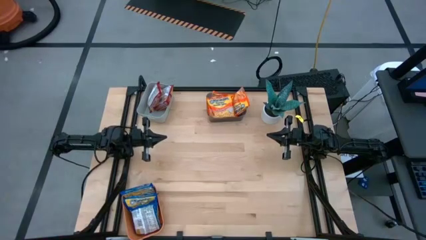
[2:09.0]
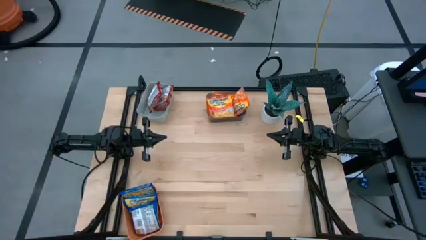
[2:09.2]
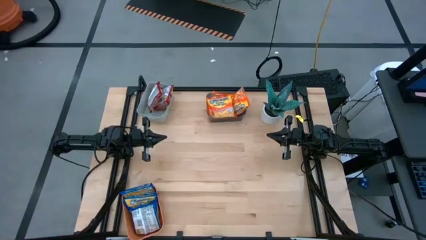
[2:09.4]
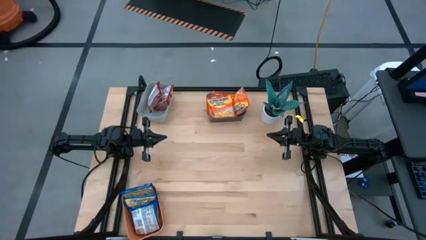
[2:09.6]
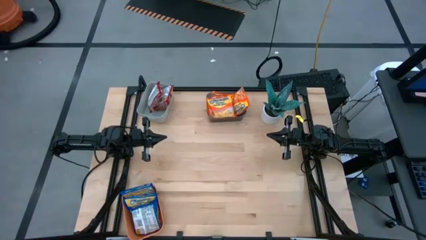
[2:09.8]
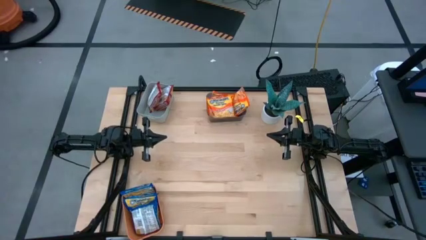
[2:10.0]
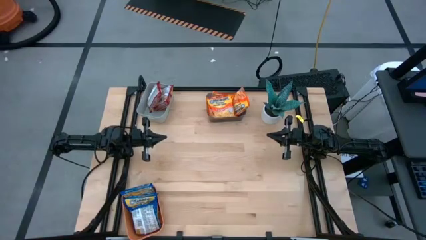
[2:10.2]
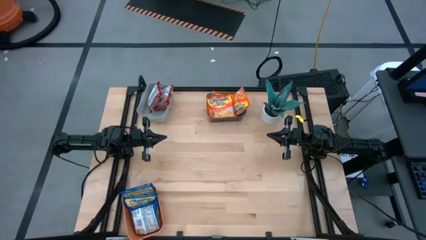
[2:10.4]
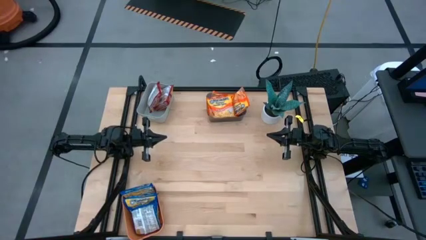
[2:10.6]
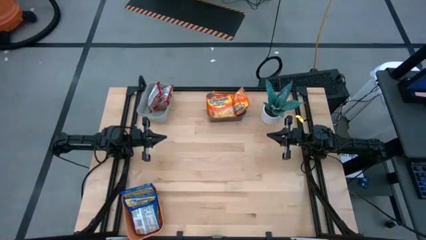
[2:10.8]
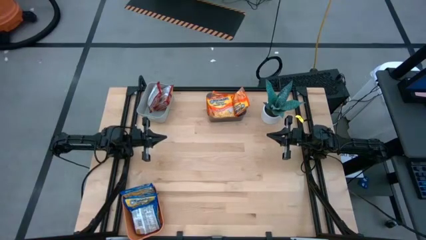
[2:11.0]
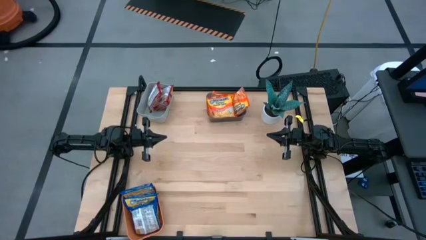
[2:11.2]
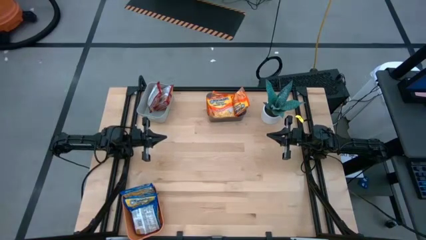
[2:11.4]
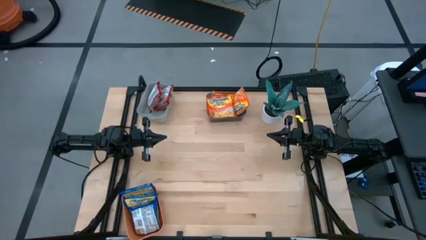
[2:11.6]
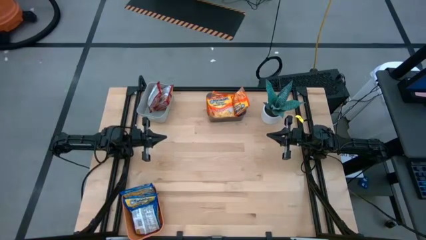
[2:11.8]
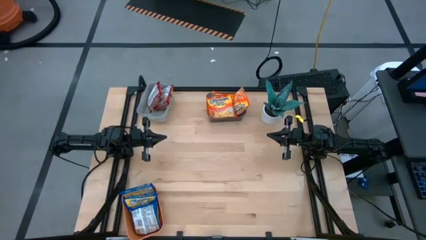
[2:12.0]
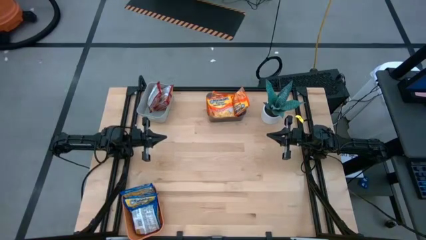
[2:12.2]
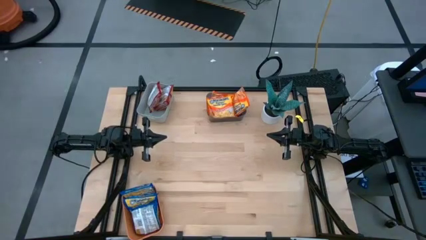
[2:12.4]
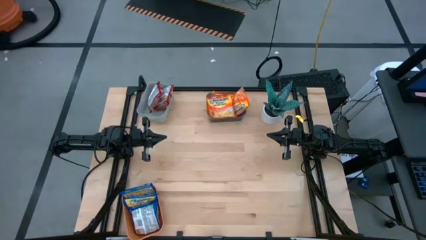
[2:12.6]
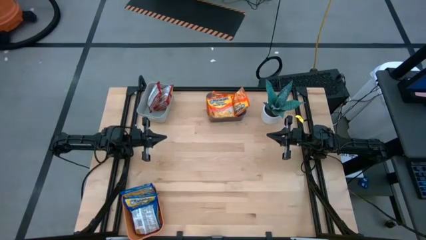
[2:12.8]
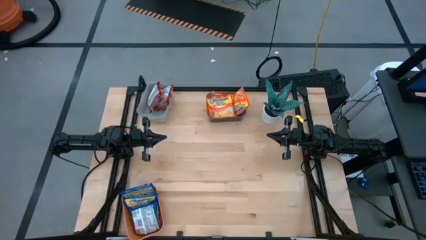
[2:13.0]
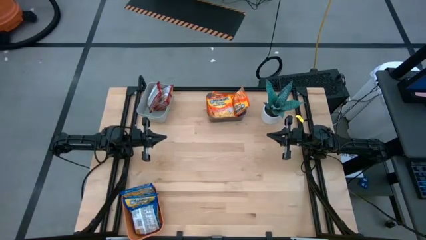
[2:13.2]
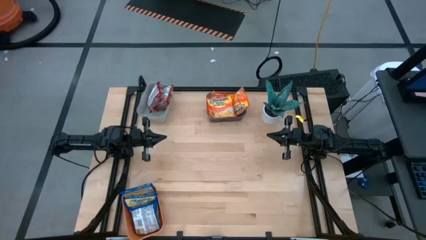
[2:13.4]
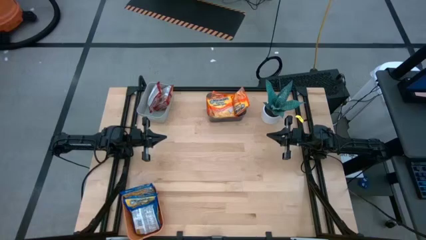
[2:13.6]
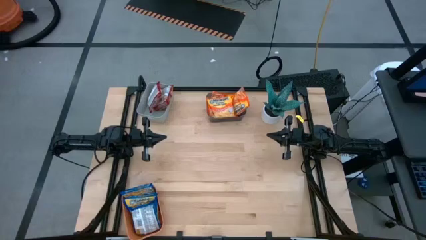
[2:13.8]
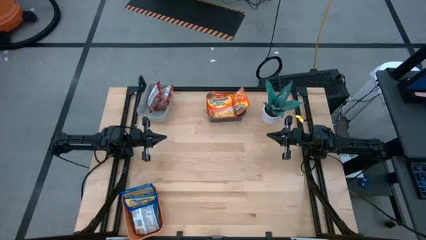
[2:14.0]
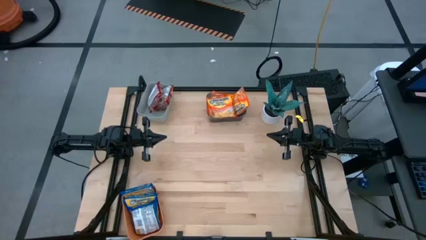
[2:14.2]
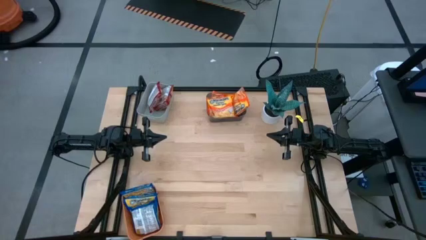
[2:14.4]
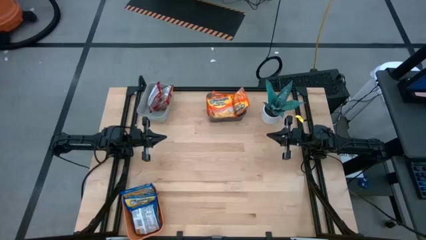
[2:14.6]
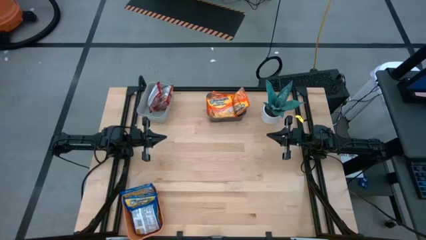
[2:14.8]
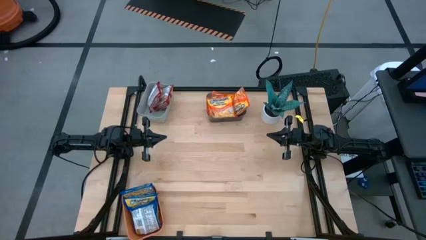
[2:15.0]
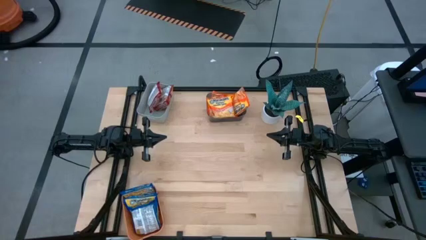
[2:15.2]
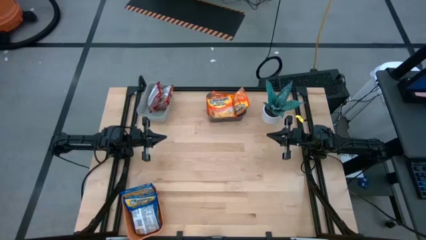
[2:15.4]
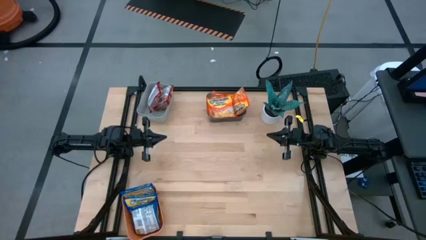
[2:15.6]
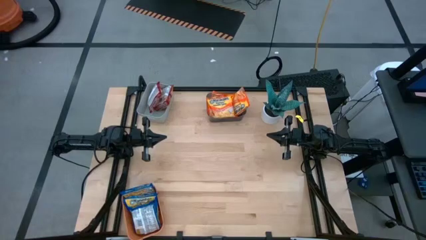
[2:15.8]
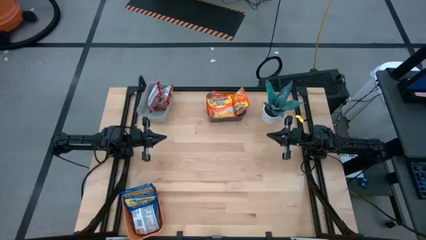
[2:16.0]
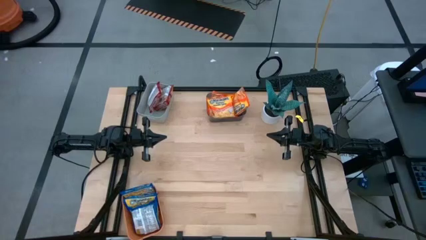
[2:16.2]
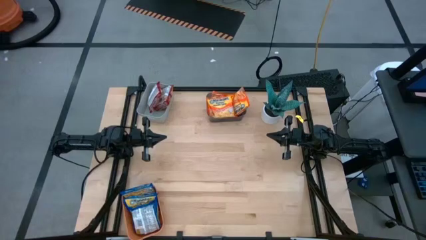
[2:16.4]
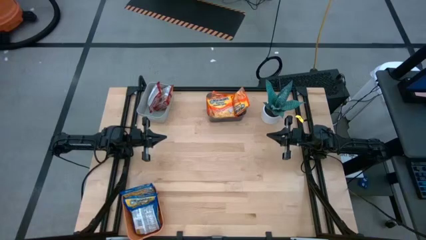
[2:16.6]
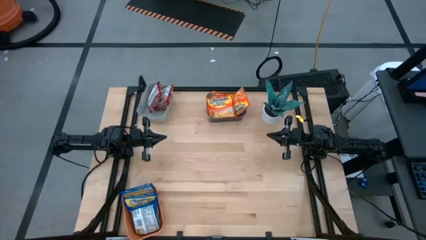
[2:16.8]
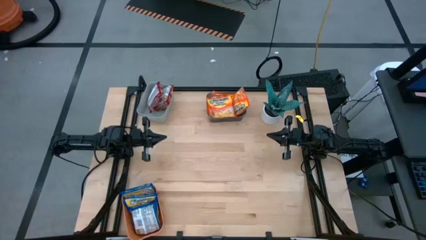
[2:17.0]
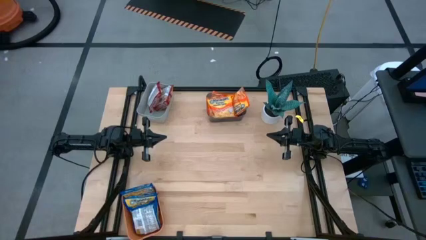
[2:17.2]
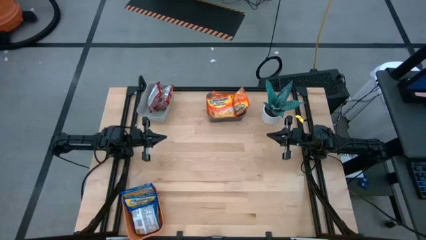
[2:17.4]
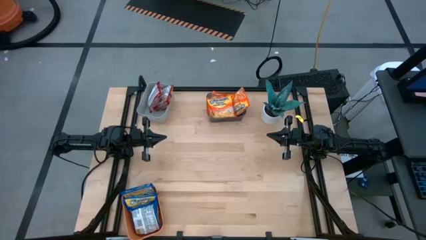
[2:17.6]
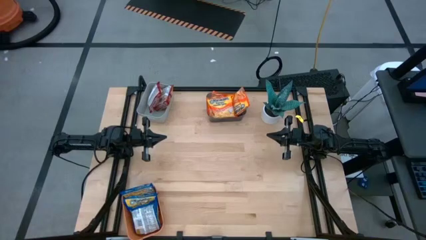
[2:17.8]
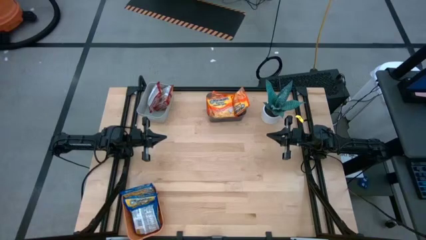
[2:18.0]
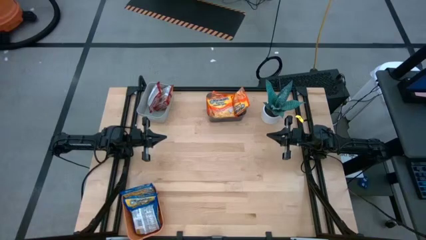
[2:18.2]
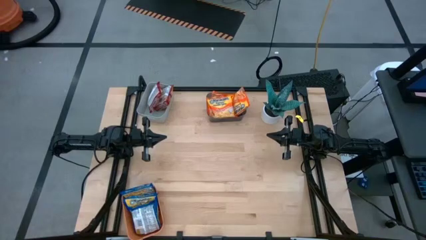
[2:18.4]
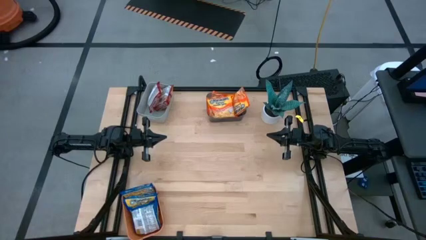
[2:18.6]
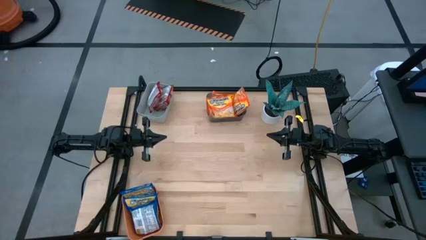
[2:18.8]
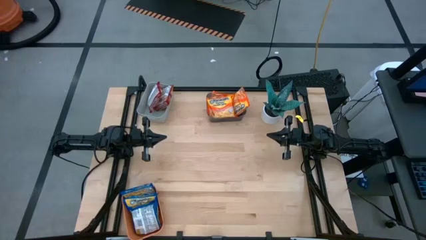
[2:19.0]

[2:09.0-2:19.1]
Task: Sort Maruchan noodles
Return to Home Position

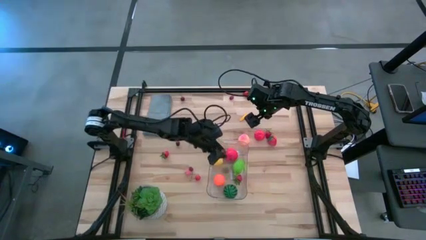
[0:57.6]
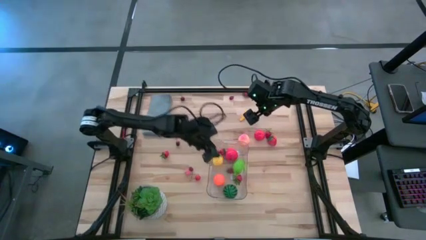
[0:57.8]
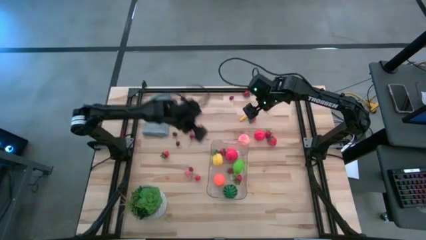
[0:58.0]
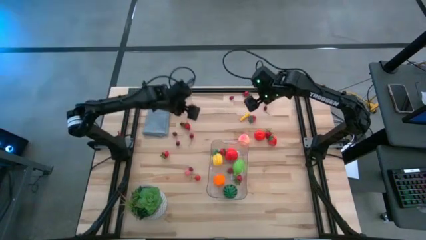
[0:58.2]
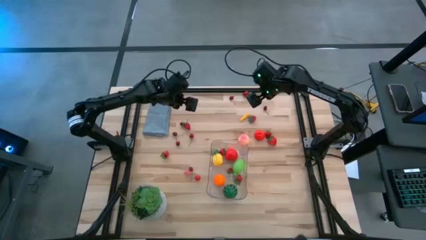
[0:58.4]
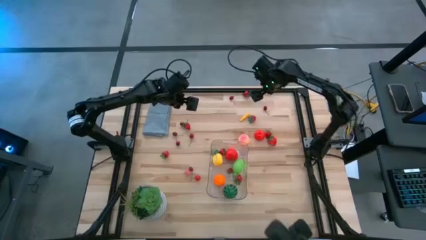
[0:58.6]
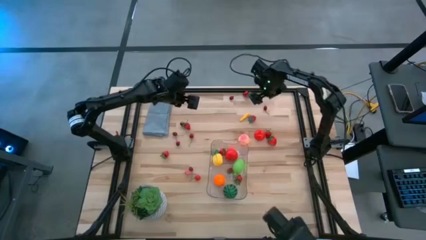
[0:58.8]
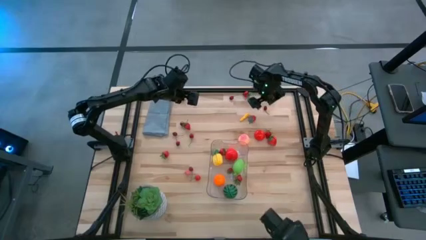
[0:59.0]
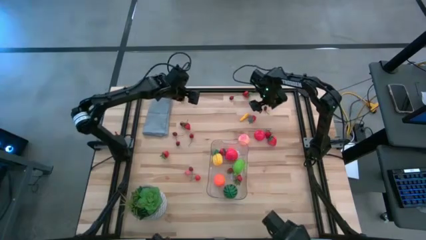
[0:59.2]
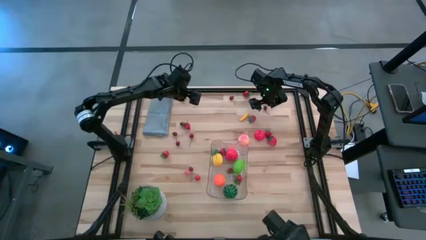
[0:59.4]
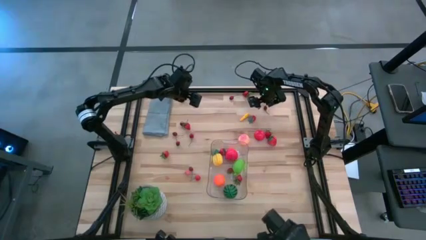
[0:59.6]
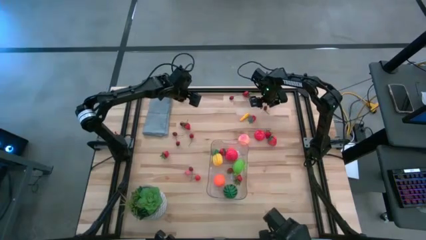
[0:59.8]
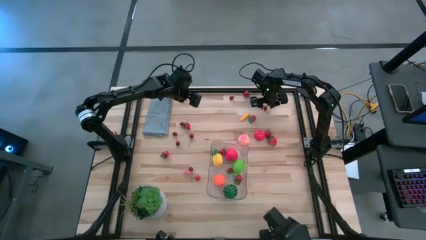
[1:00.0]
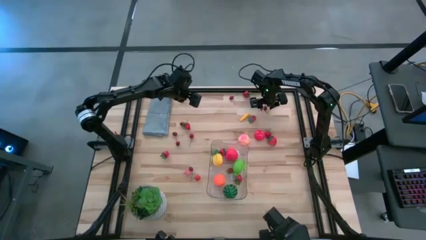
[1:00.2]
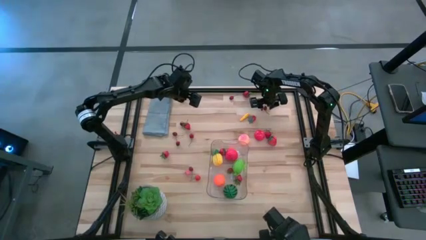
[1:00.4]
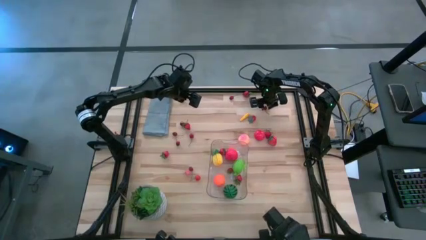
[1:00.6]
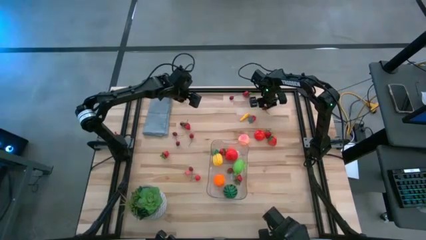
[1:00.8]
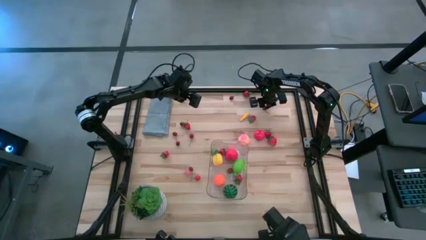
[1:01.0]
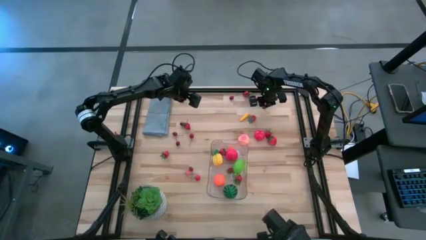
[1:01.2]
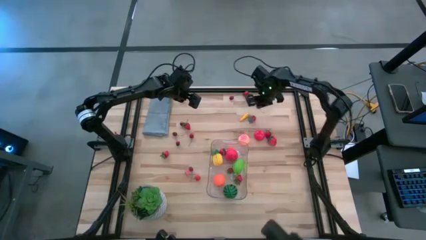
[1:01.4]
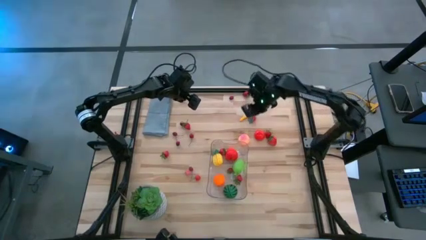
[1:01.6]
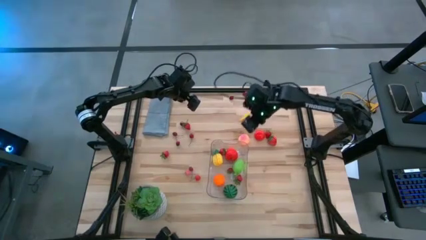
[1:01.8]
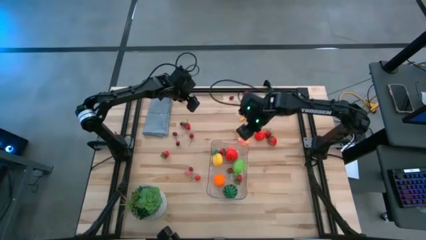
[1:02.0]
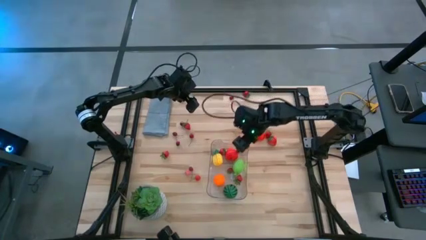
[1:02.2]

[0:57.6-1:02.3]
Task: Pick and placing Produce into tupperware
Put the cherry into the transparent bin

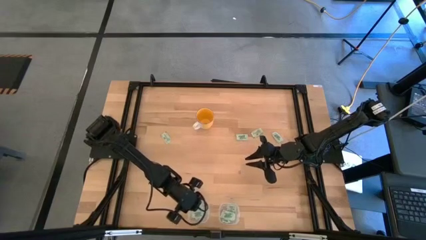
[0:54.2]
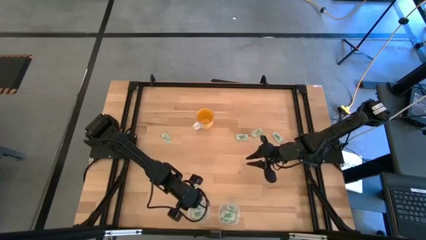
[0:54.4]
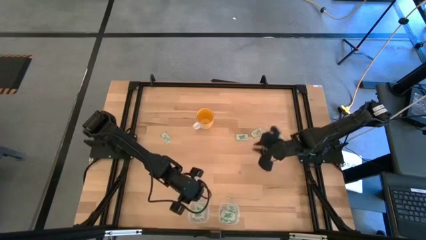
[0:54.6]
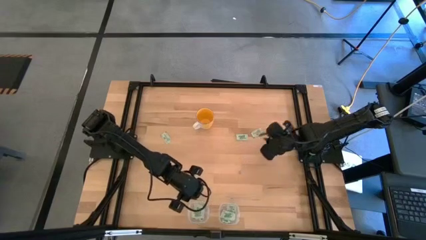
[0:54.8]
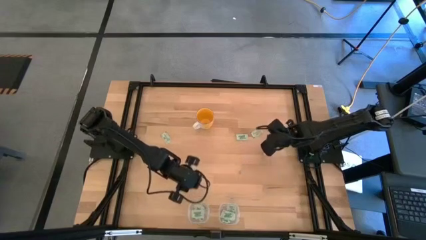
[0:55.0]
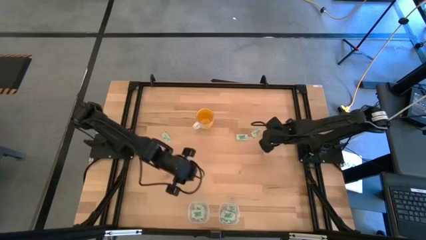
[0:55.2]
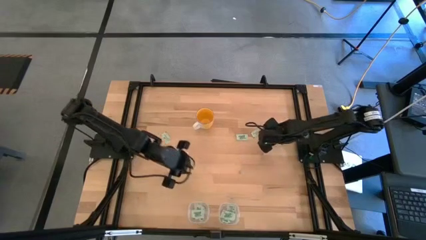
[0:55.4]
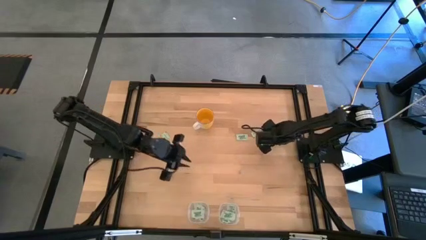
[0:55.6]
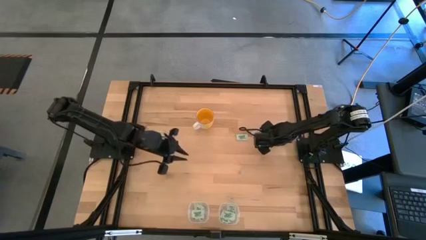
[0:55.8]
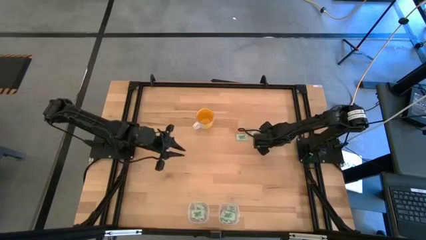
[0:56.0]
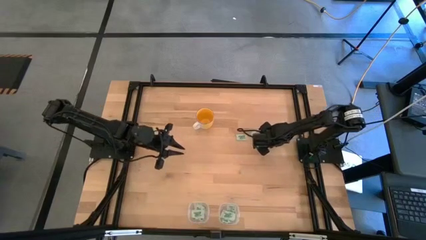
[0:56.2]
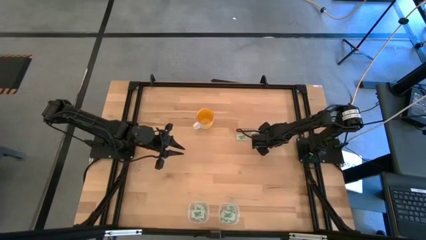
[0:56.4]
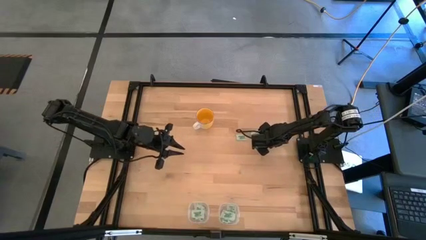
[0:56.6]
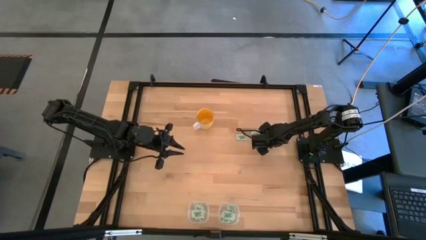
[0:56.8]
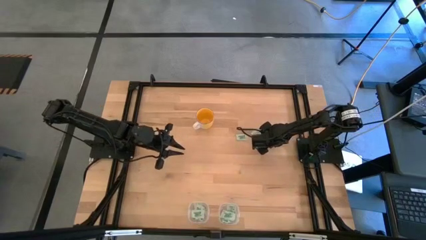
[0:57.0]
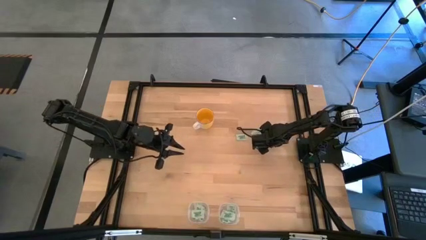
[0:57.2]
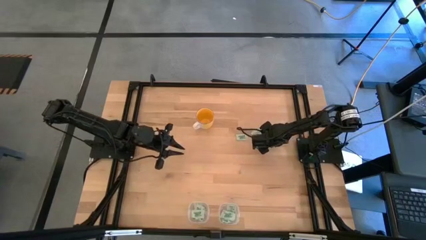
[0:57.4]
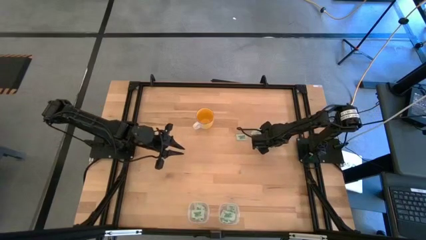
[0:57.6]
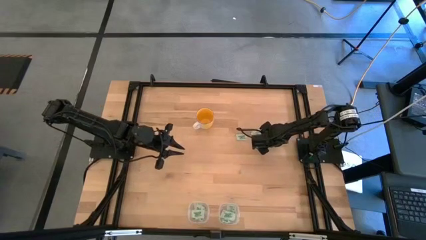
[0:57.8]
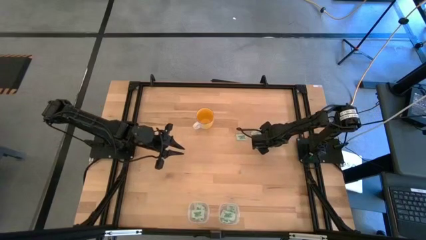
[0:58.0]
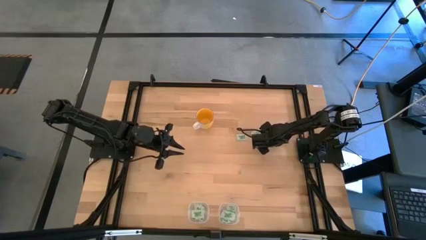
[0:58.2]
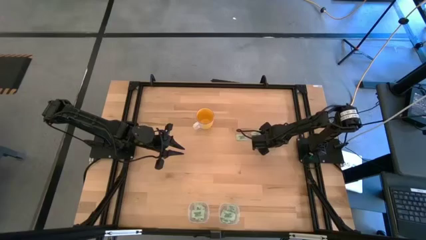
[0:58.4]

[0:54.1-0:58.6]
Task: Pick and place items into bin
Put the green stevia packet into the right transparent bin
